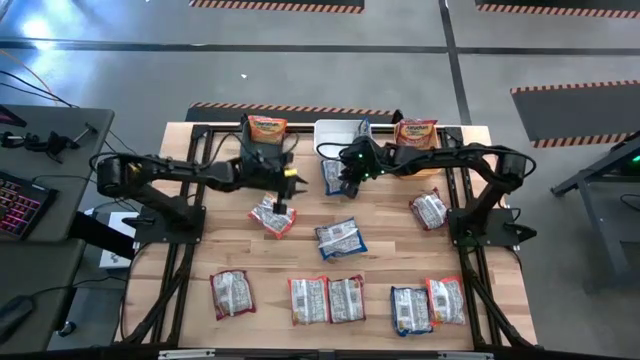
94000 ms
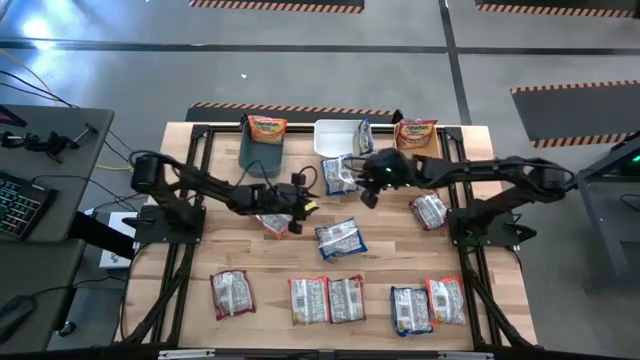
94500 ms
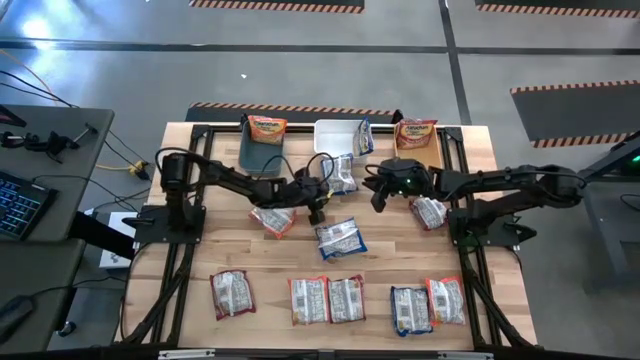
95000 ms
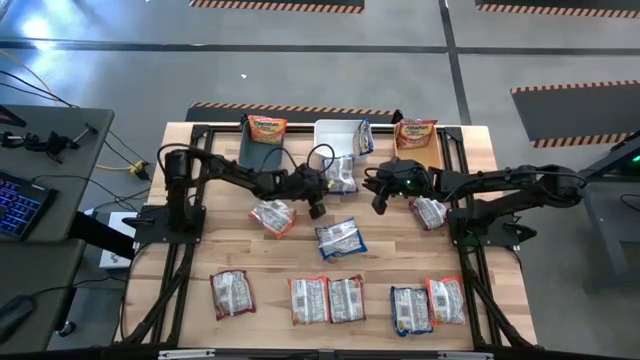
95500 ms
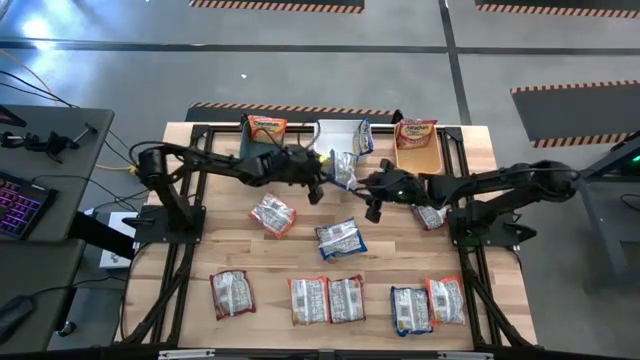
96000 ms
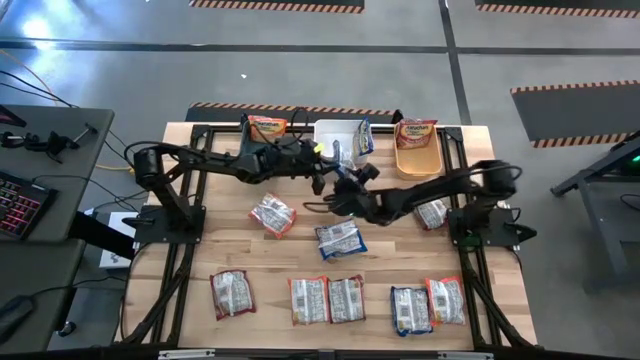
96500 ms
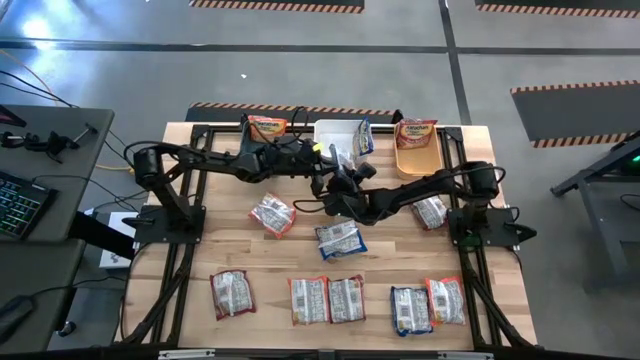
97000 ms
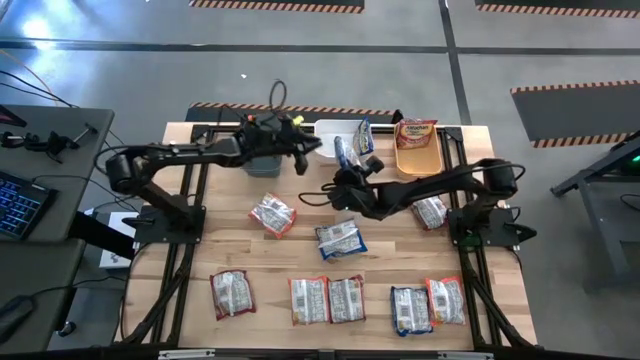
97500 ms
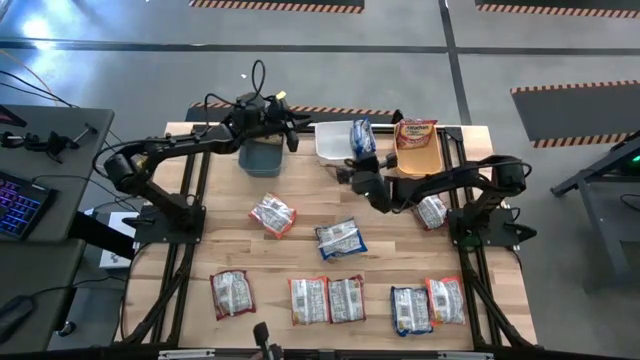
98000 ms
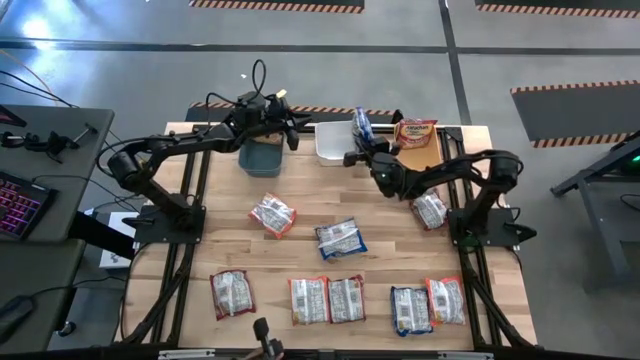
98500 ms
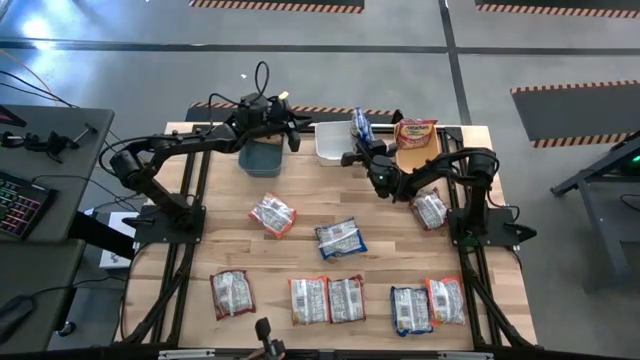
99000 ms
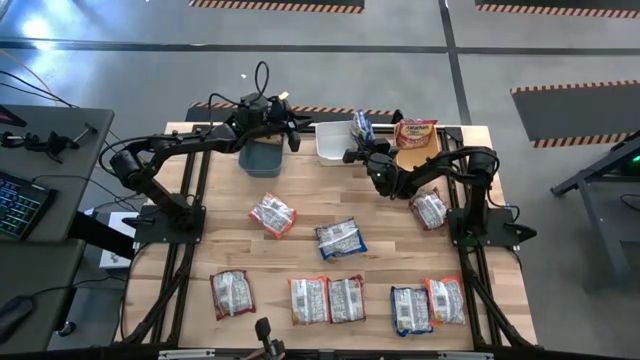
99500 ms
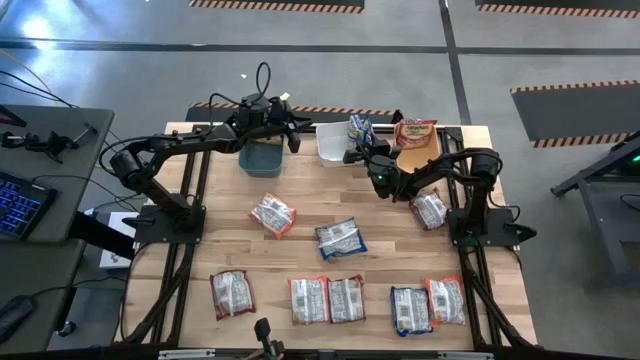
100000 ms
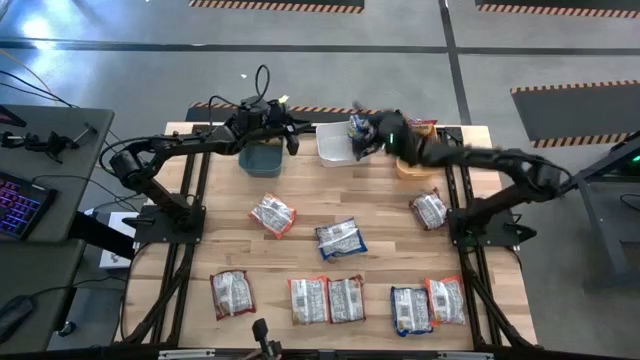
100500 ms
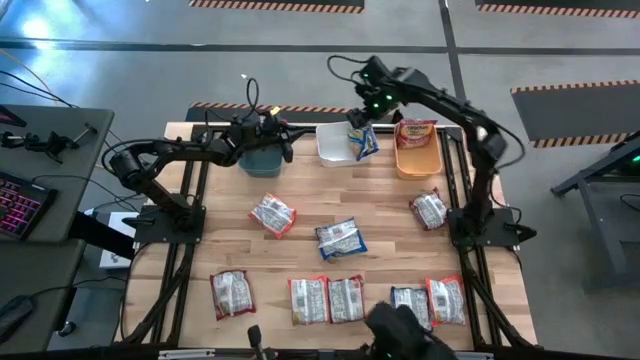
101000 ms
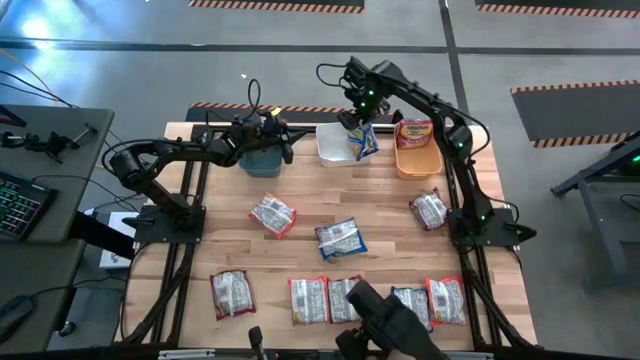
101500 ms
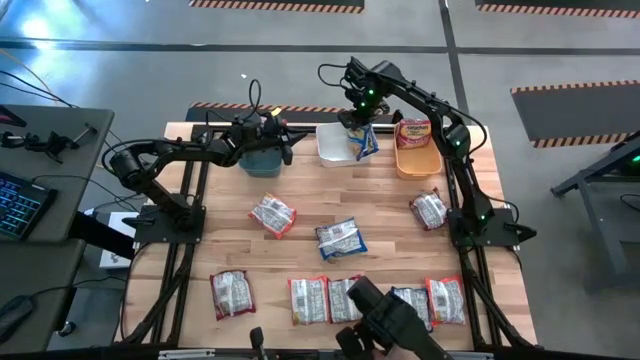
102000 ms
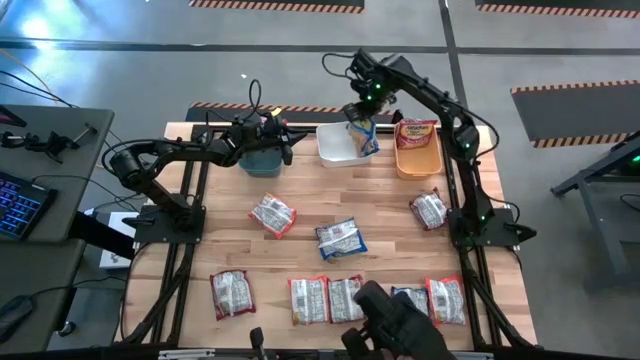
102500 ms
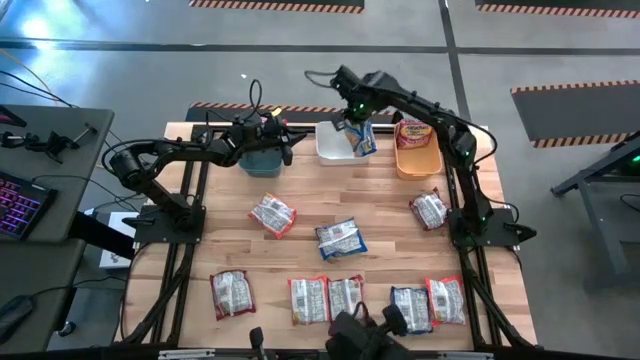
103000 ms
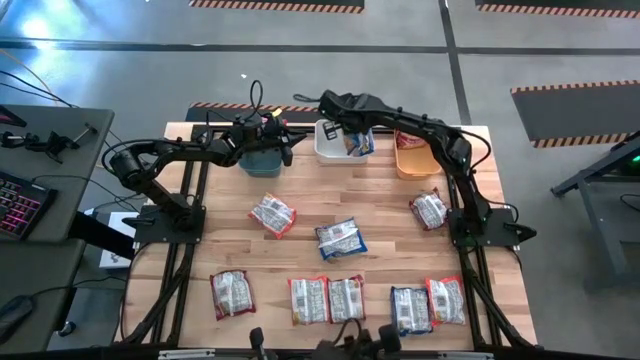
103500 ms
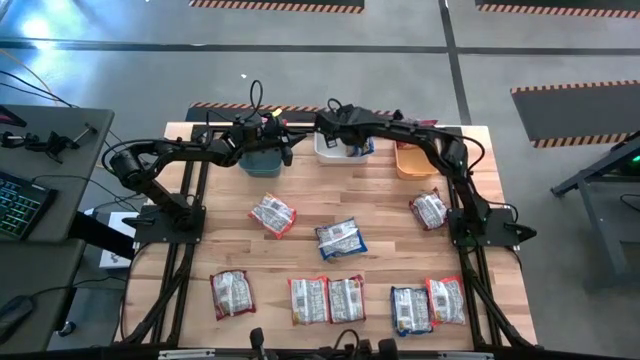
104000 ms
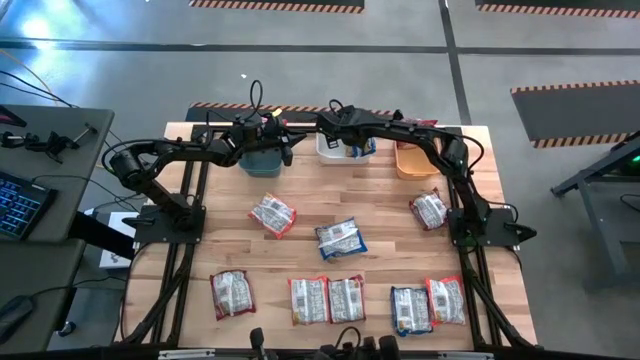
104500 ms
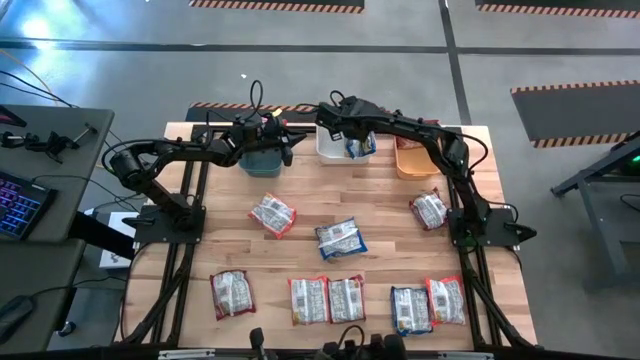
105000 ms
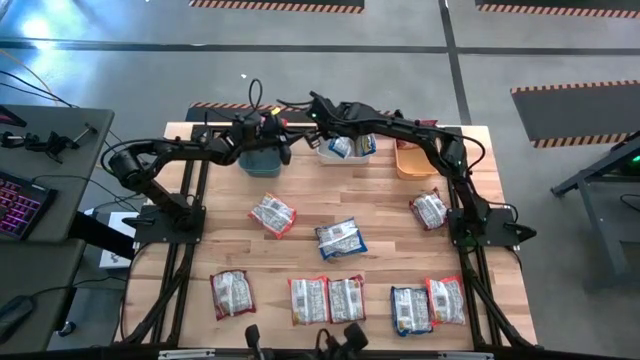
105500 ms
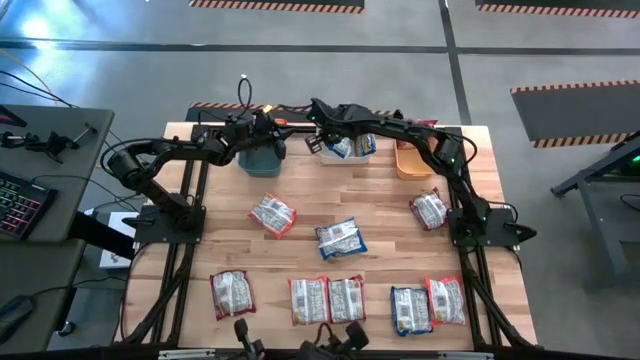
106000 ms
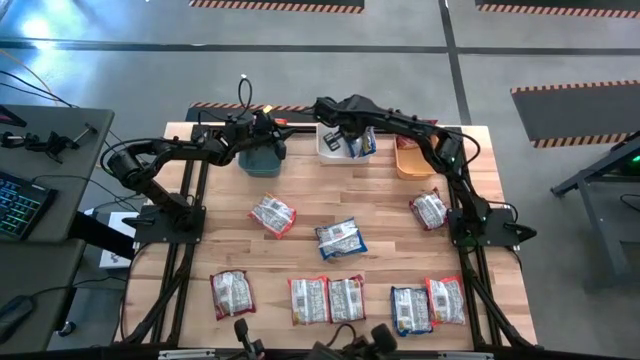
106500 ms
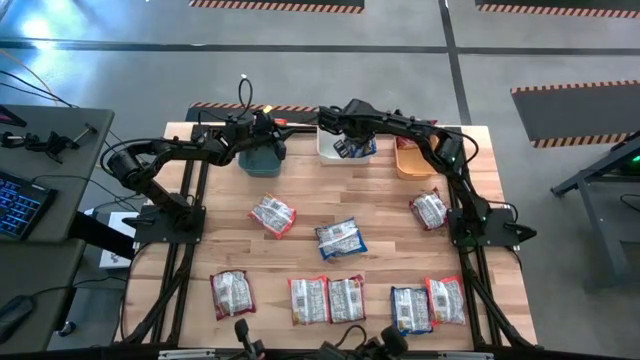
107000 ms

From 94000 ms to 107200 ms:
Task: Sort Maruchan noodles
Put the top blue noodle pack into the white bin

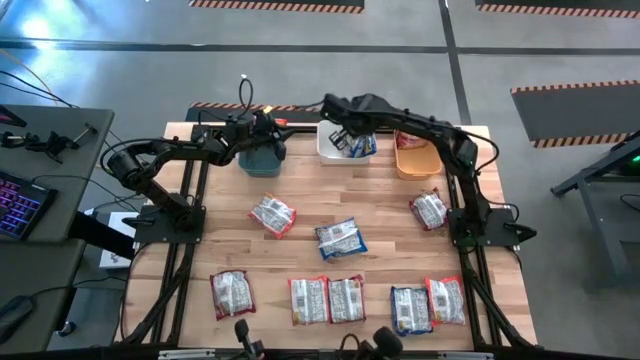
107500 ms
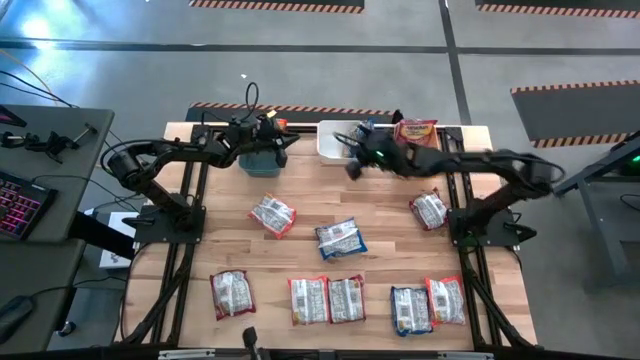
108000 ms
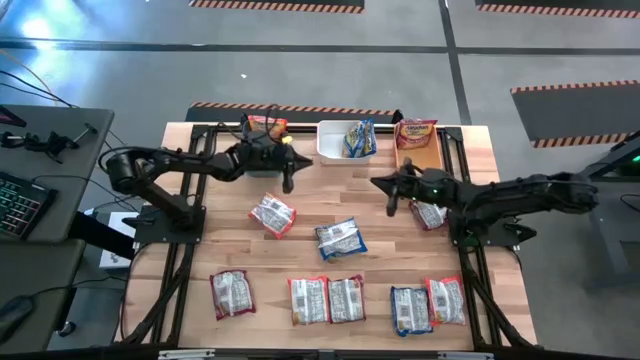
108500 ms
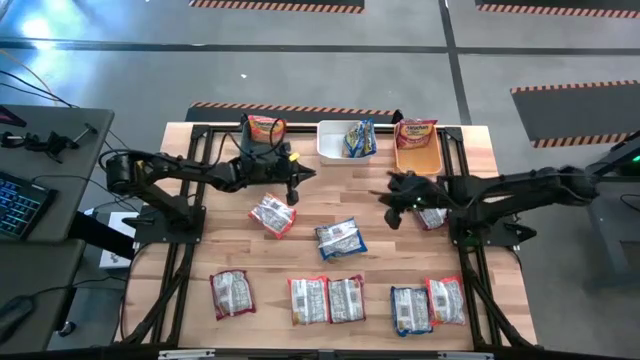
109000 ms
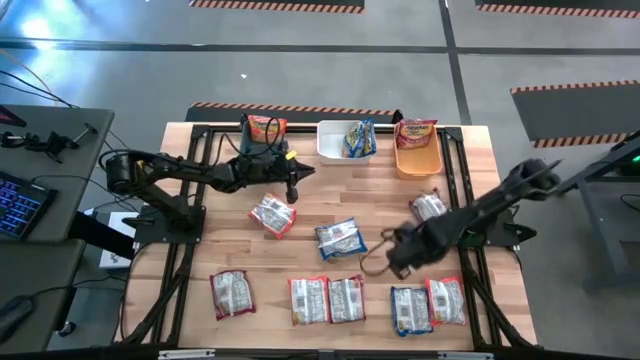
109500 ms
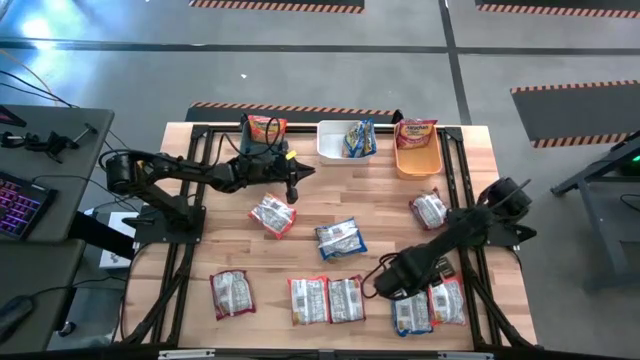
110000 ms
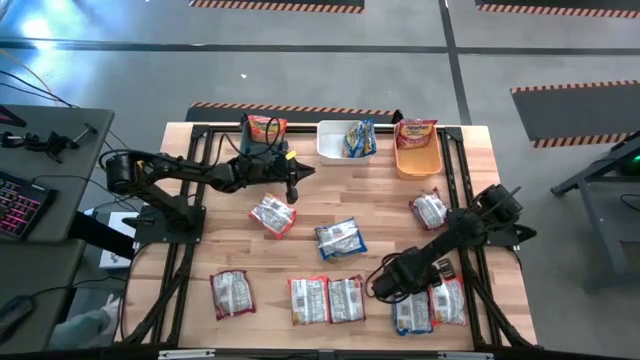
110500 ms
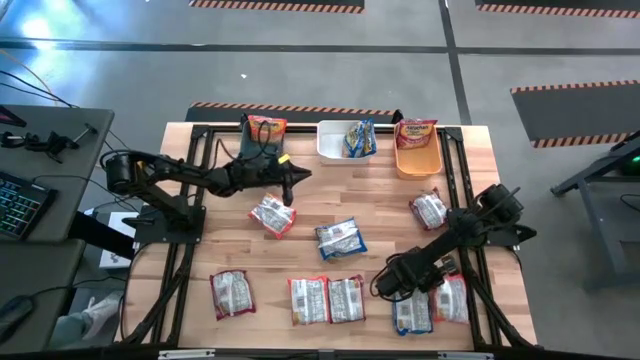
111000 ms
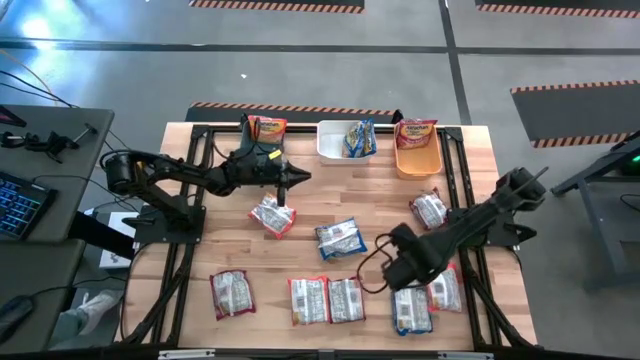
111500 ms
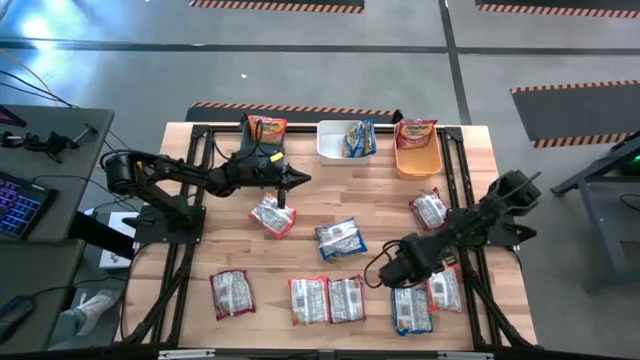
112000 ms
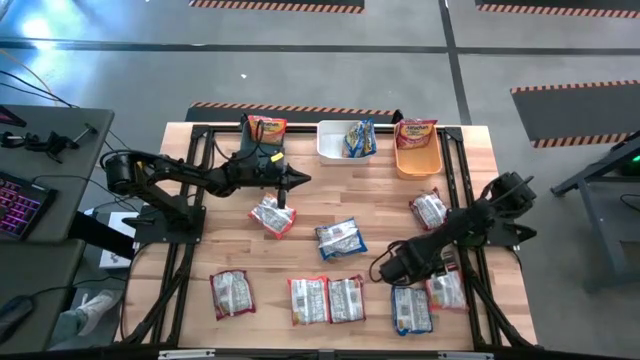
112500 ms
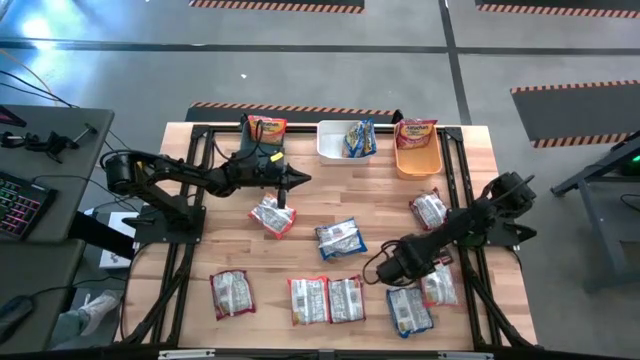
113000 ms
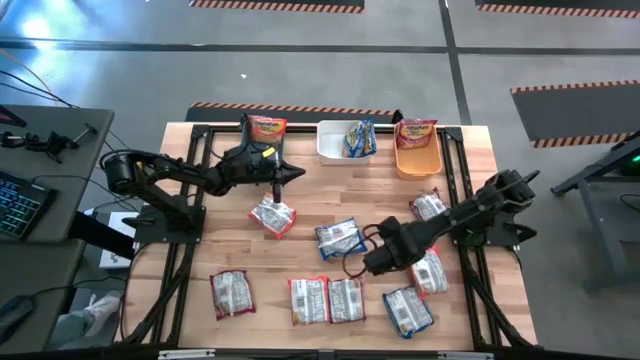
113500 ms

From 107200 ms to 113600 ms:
Put the right orange noodle pack into the yellow bin

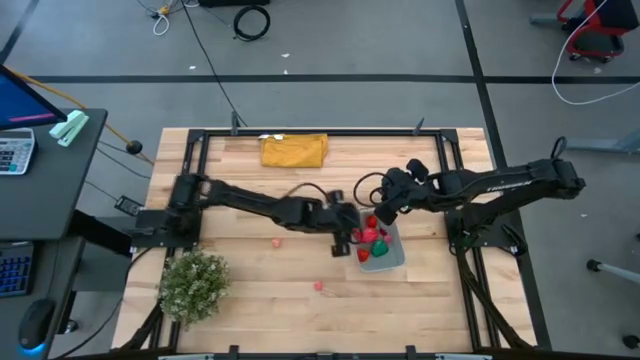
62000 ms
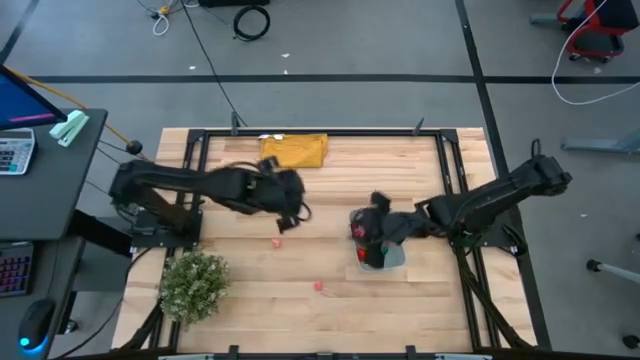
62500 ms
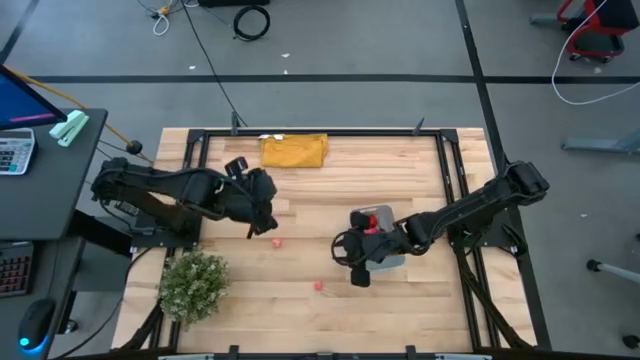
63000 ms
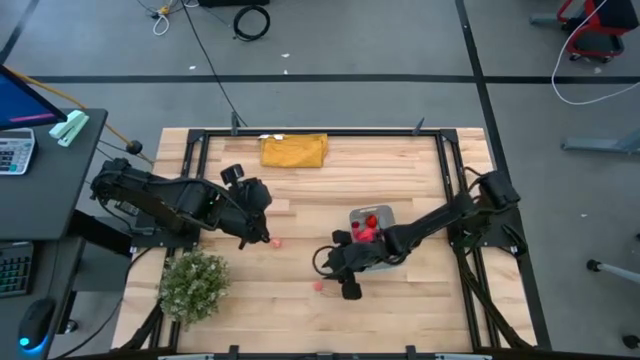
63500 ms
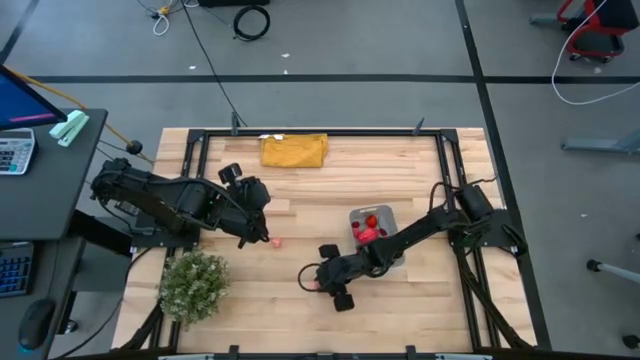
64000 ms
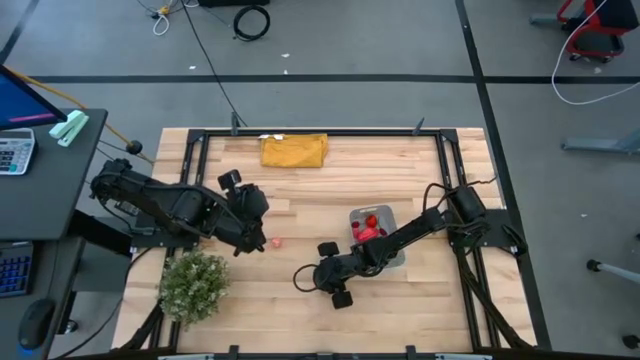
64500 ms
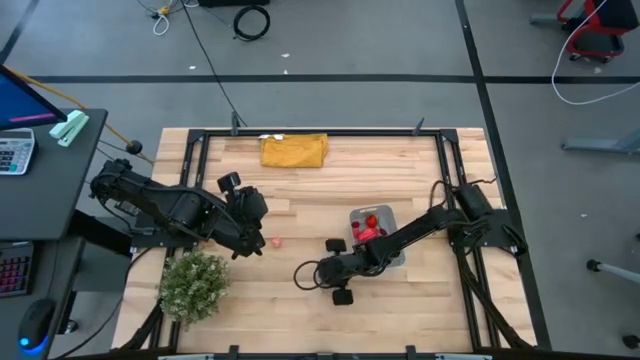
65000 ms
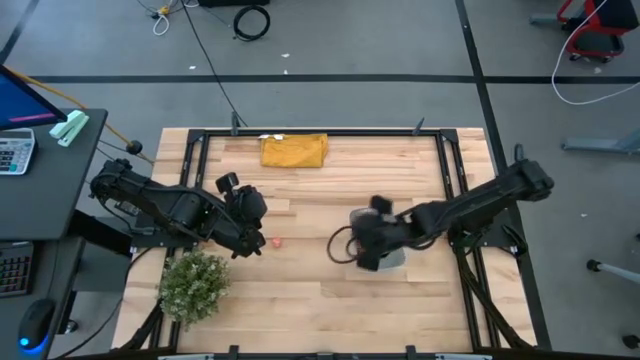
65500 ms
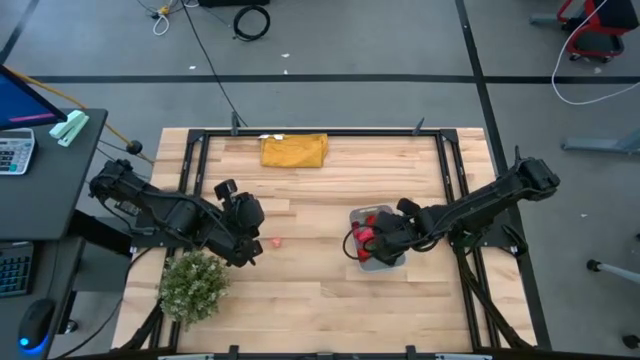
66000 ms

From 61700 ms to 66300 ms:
Task: Pick and placing Produce into tupperware
Put the pink peach into the gray bin
